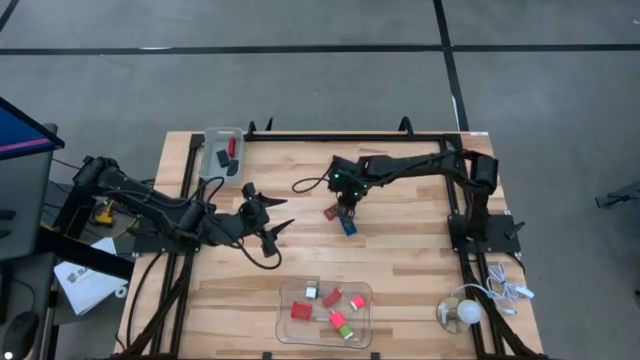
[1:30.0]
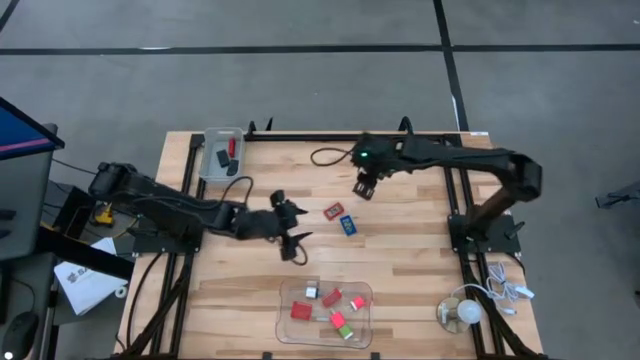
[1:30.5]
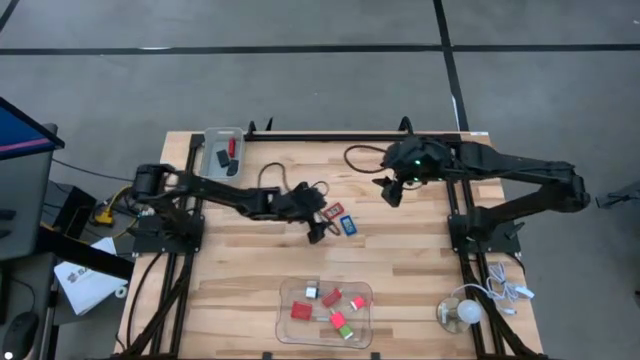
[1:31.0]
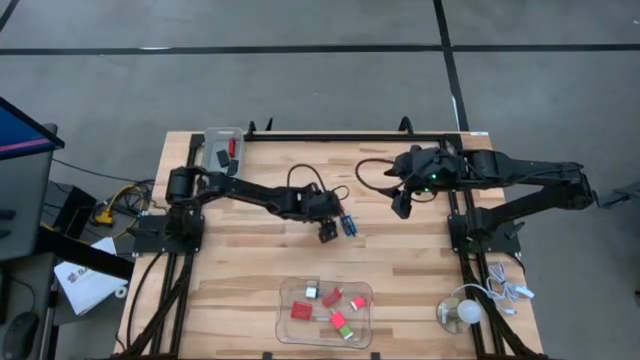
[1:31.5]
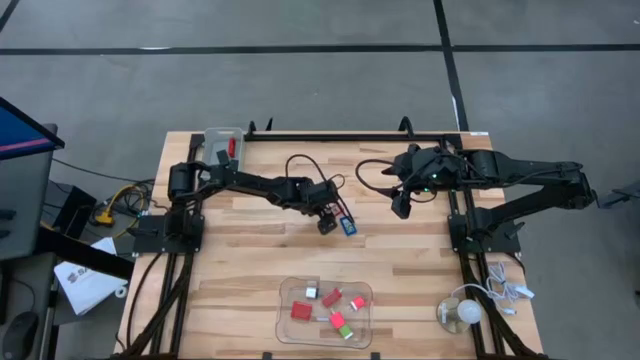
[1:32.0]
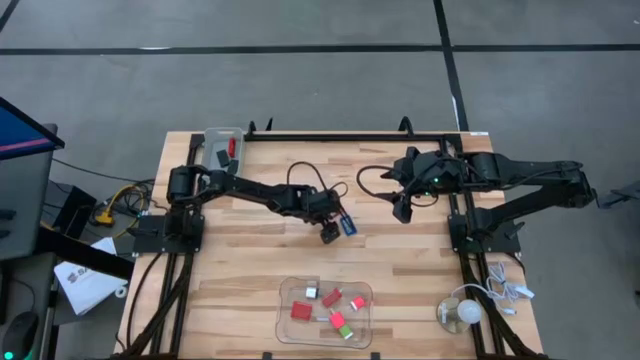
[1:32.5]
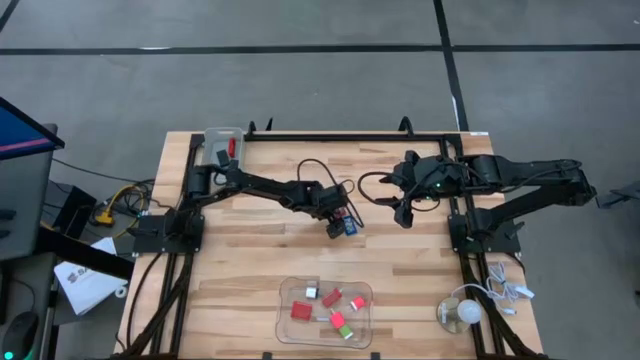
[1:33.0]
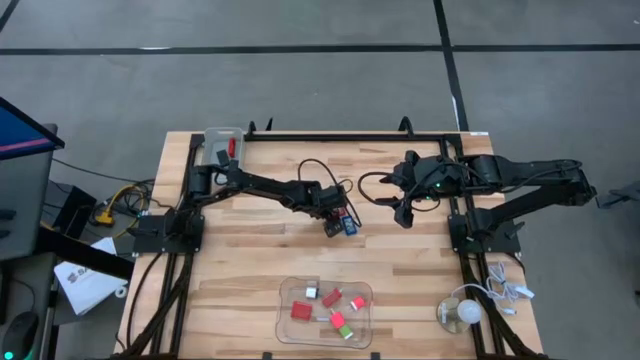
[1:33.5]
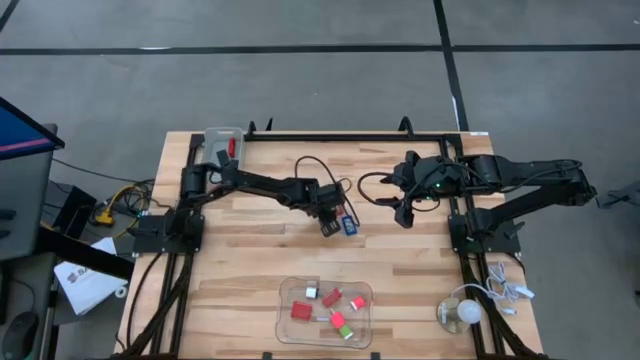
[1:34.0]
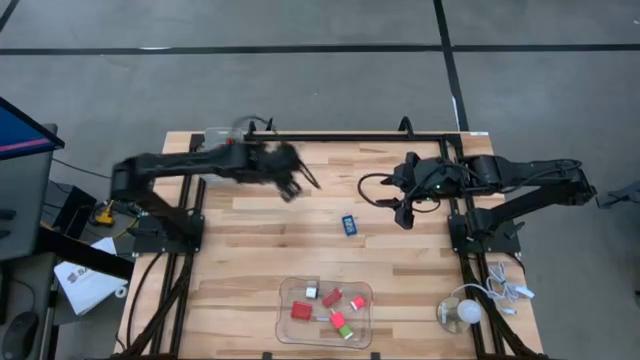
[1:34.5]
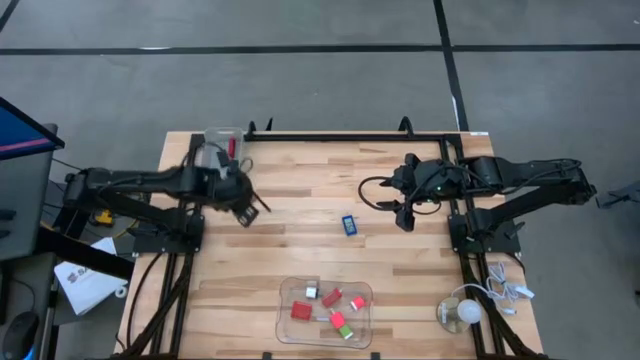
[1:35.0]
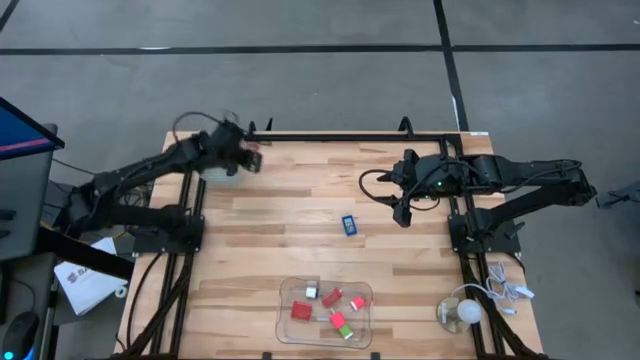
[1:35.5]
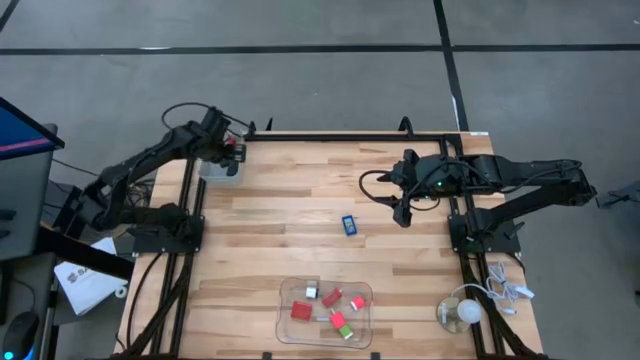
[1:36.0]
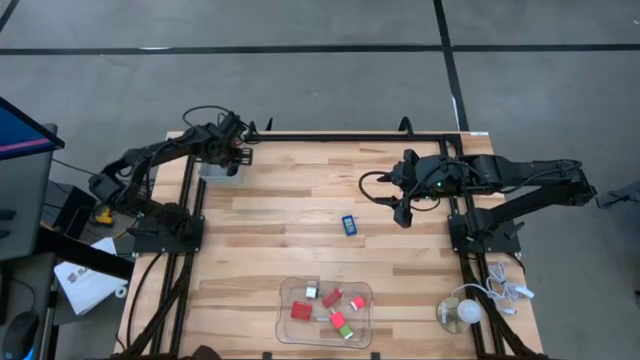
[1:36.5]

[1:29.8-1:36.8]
Task: Pick & Place Office items
Put the red digital clock into the gray bin

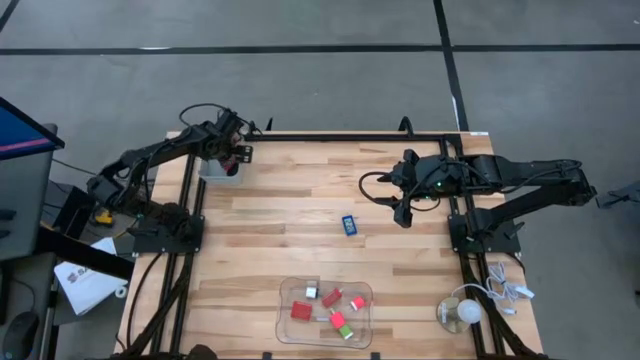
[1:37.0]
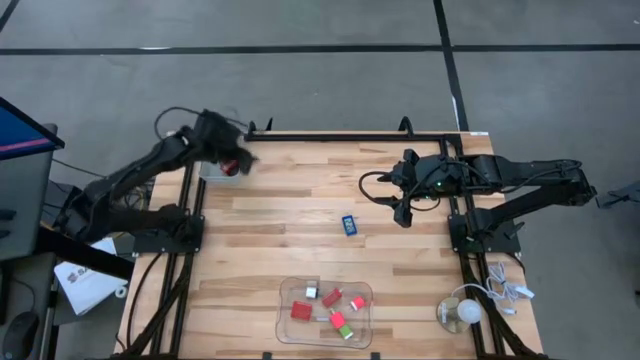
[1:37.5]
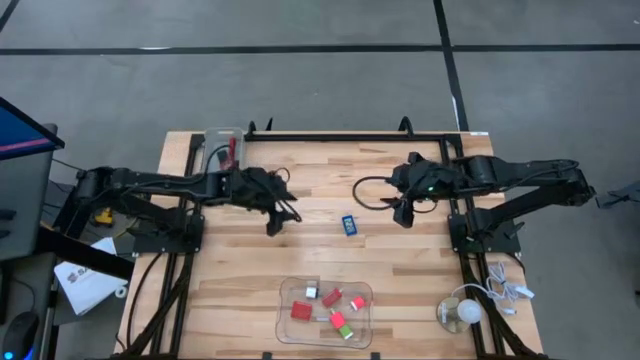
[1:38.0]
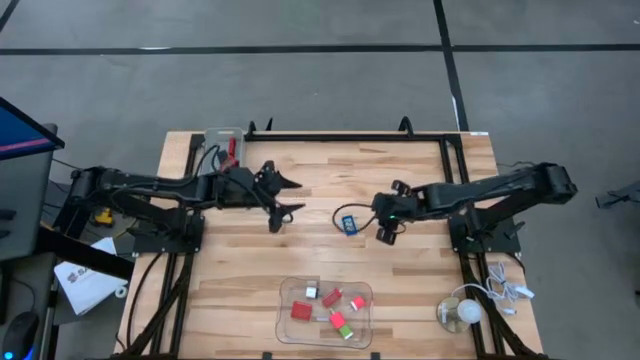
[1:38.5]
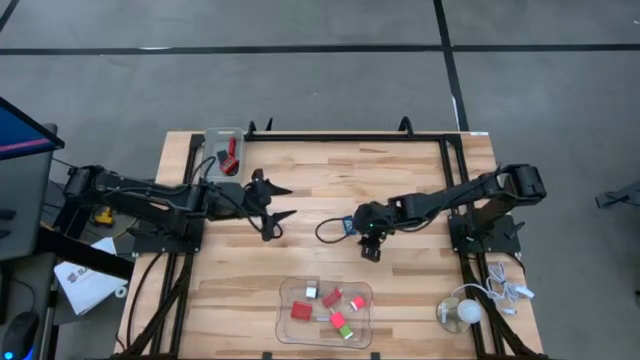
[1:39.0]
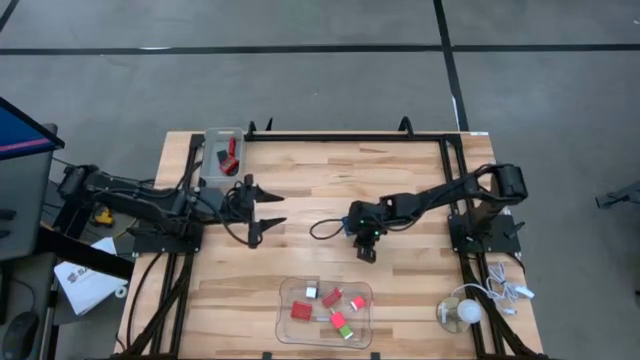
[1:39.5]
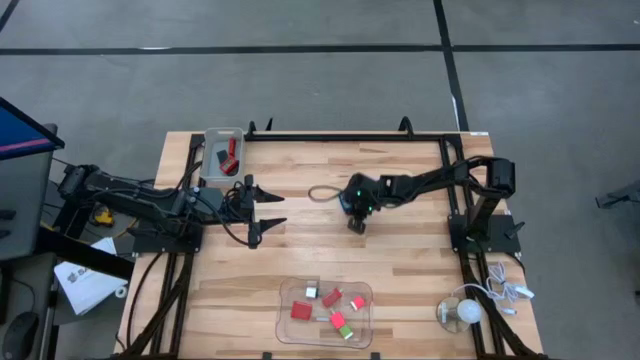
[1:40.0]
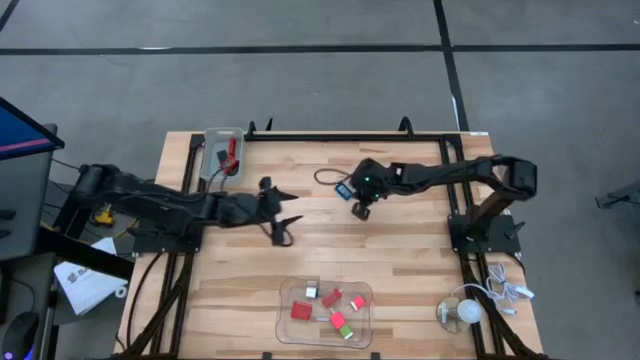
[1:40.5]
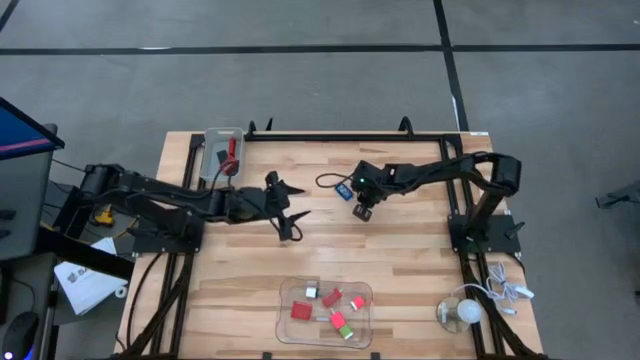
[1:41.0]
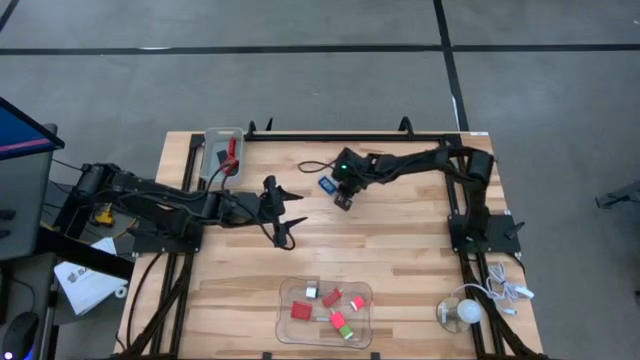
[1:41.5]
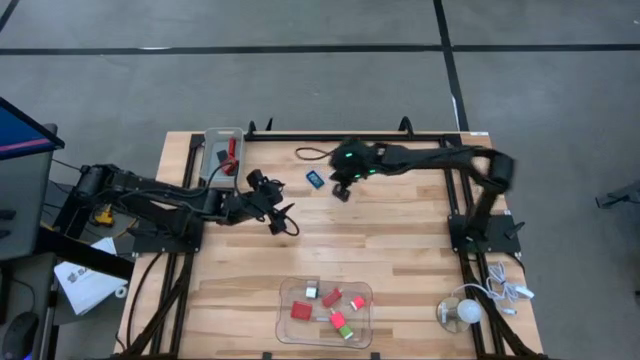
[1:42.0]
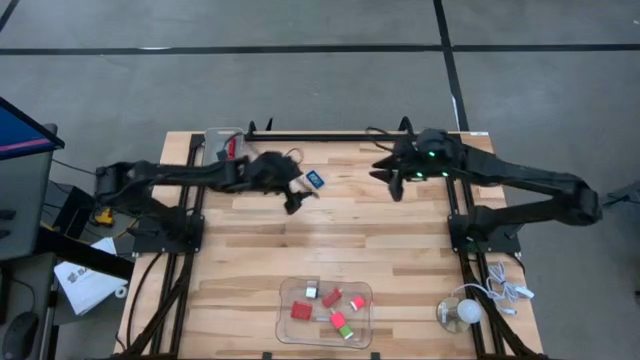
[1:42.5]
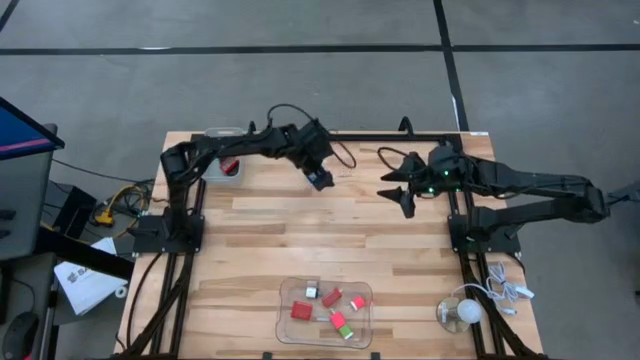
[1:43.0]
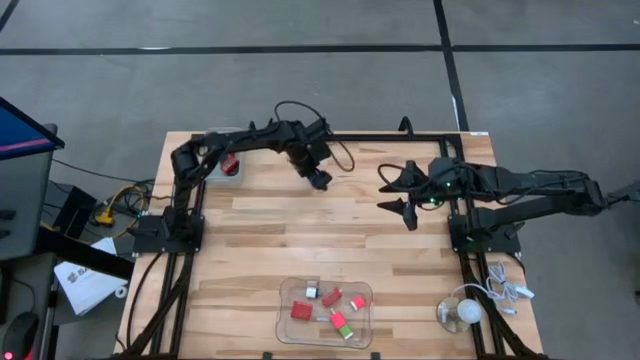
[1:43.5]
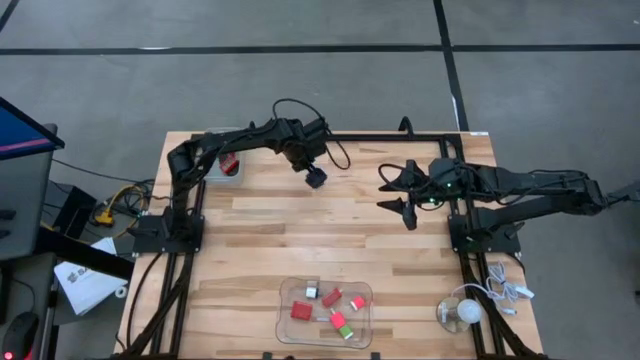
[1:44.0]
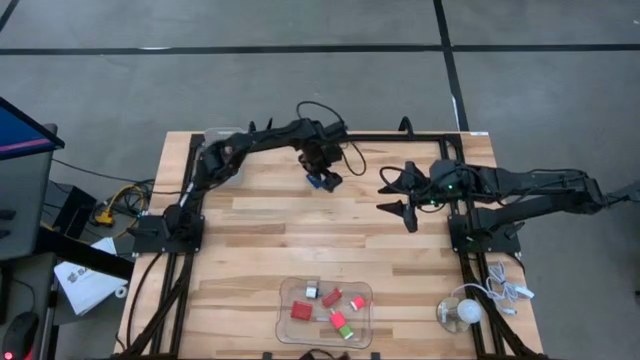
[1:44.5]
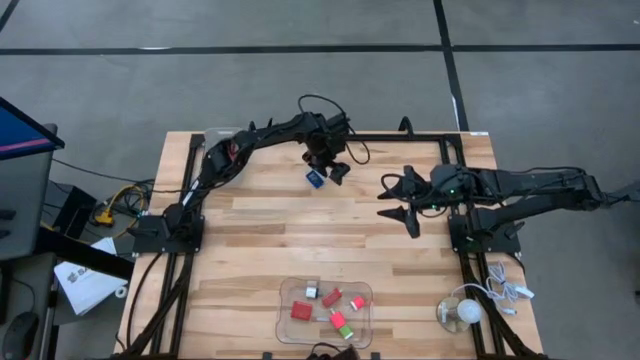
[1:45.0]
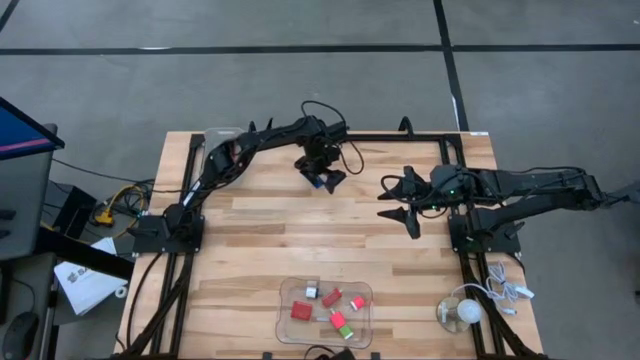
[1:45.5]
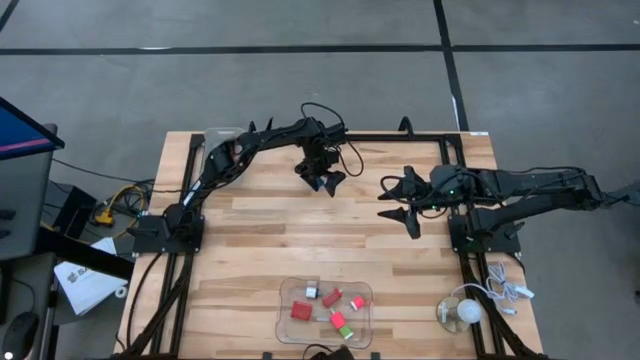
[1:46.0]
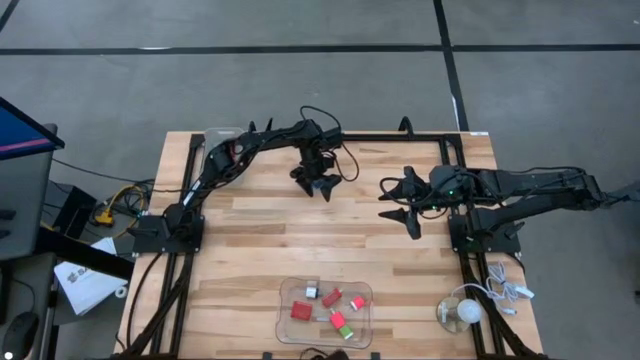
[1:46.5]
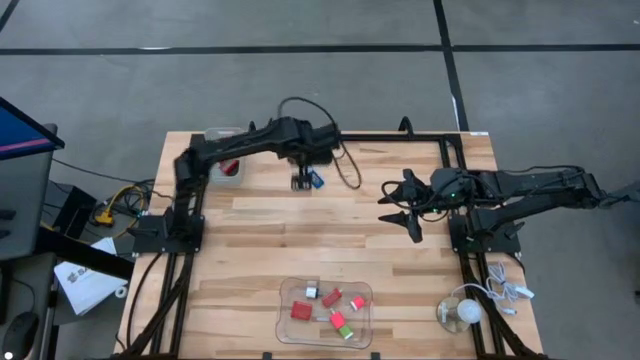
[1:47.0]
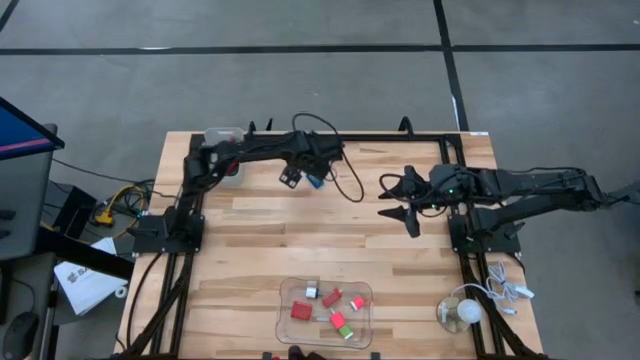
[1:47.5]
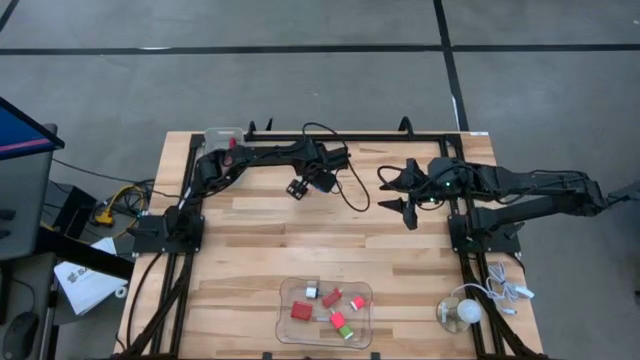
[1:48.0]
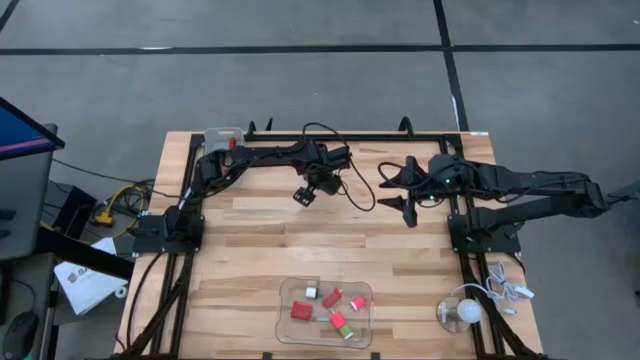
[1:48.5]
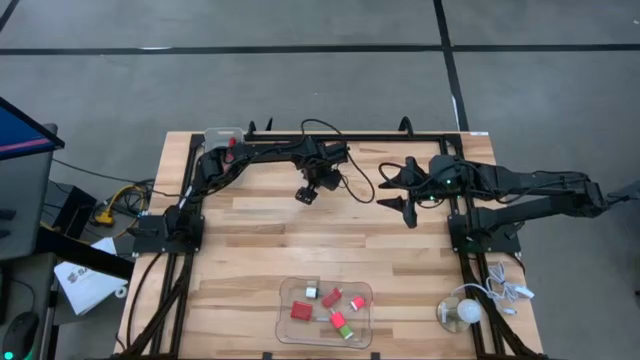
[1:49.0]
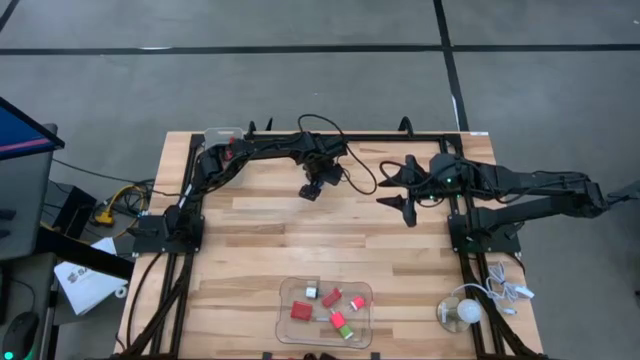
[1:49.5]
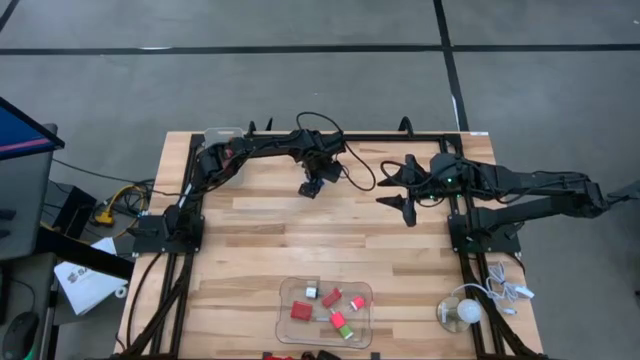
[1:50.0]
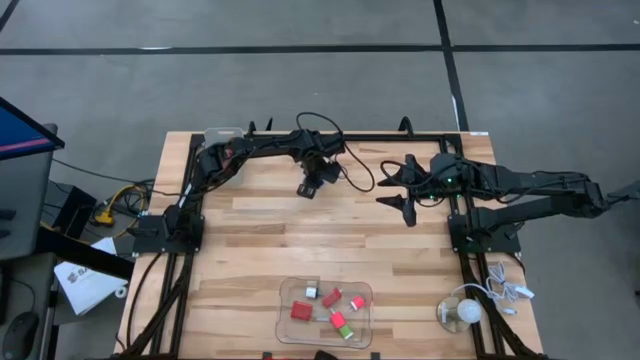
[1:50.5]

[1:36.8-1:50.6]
Put the blue digital clock into the gray bin

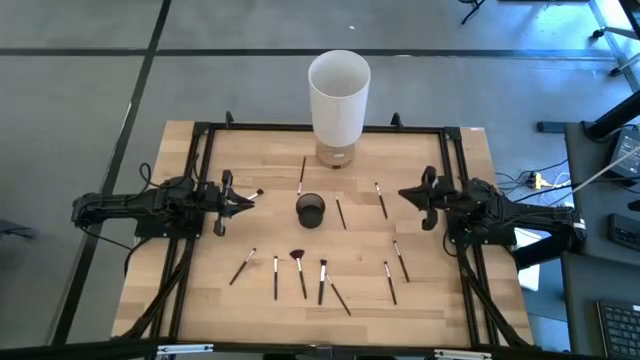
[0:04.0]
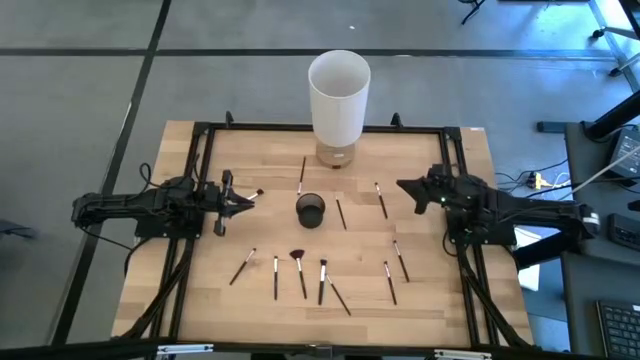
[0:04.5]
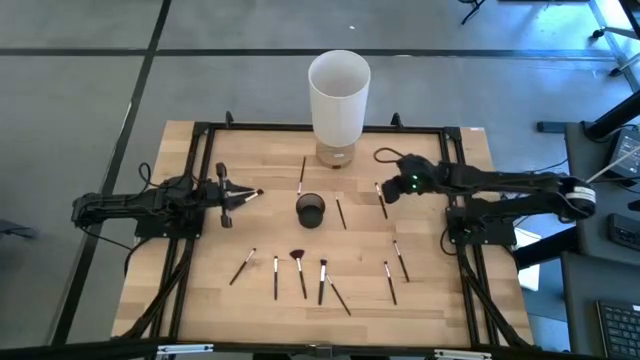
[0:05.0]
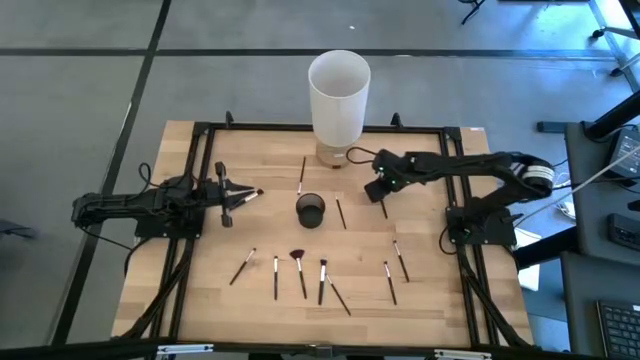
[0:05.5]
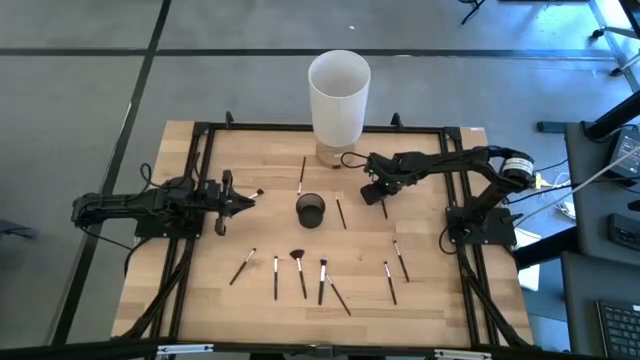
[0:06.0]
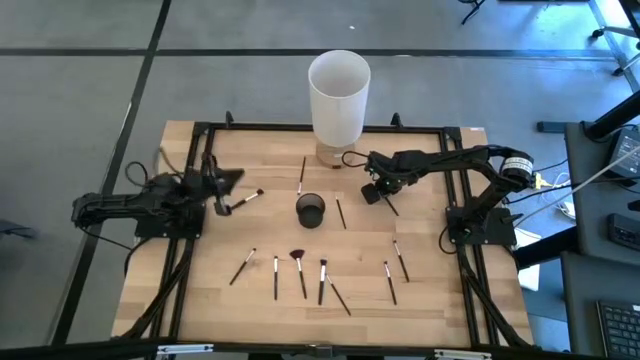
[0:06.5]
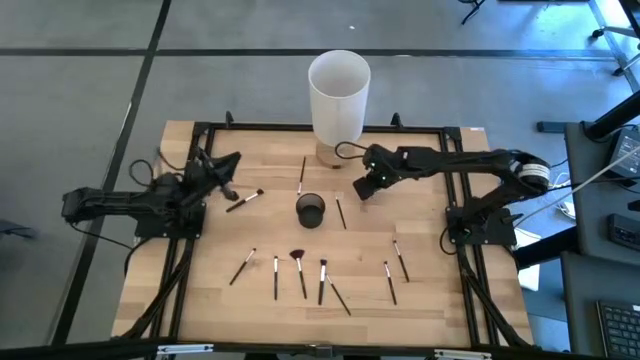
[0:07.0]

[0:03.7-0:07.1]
Task: Put items in baskets/containers
Put the black eyeshadow brush into the black pen holder
